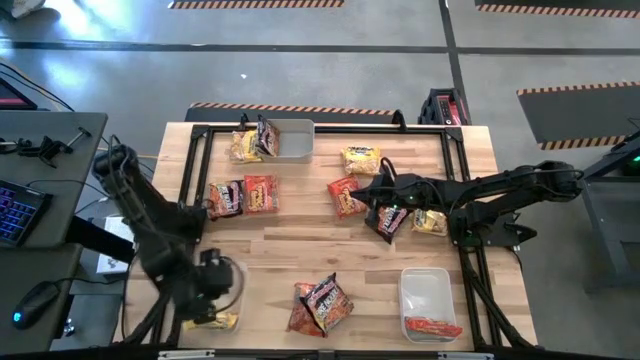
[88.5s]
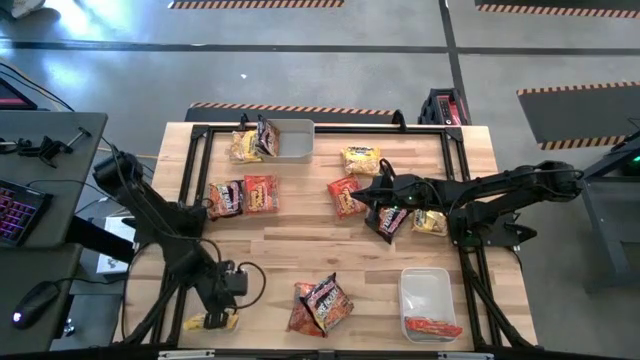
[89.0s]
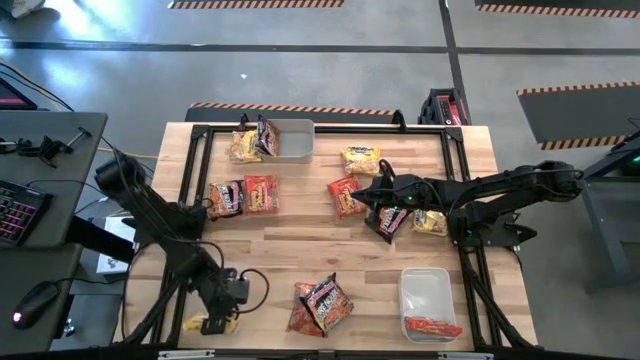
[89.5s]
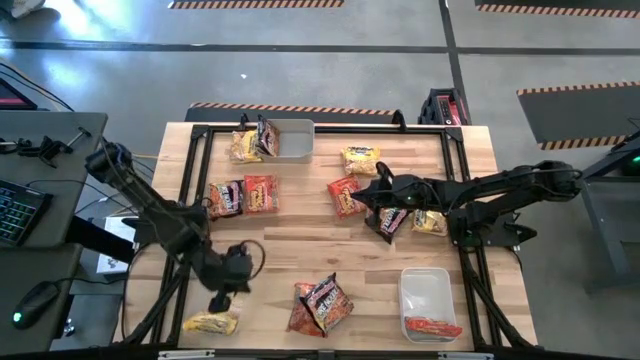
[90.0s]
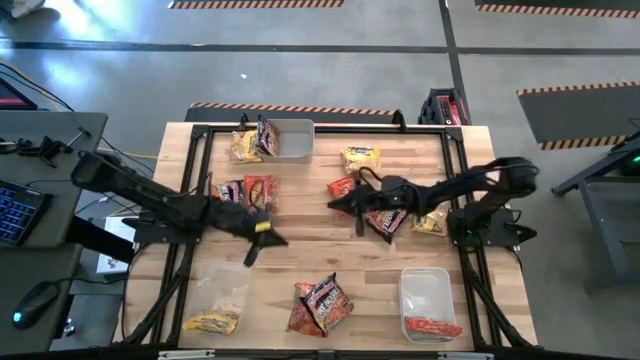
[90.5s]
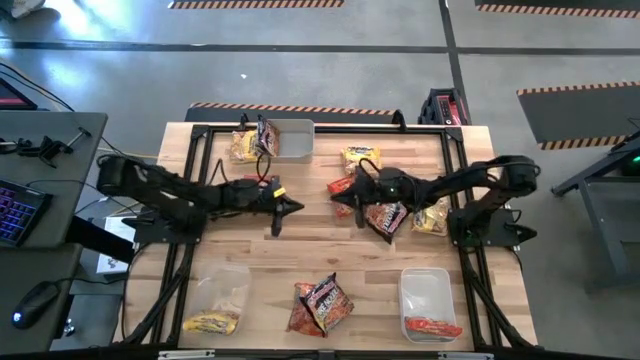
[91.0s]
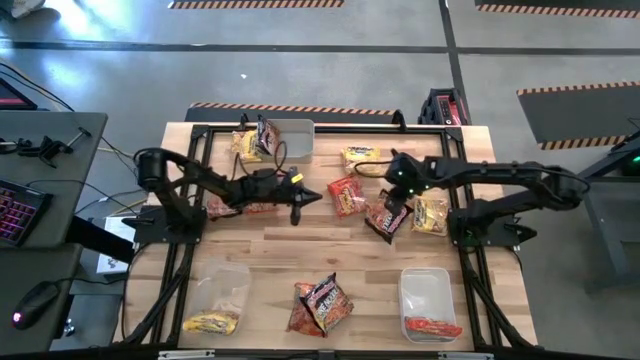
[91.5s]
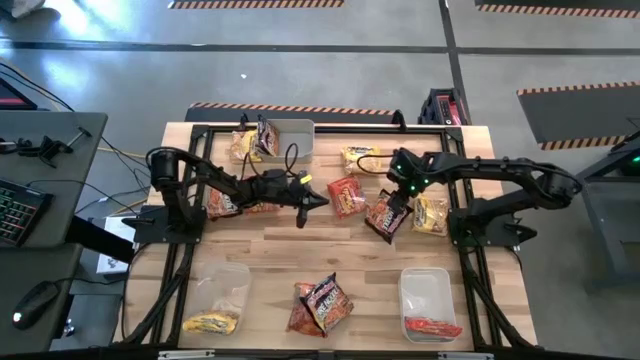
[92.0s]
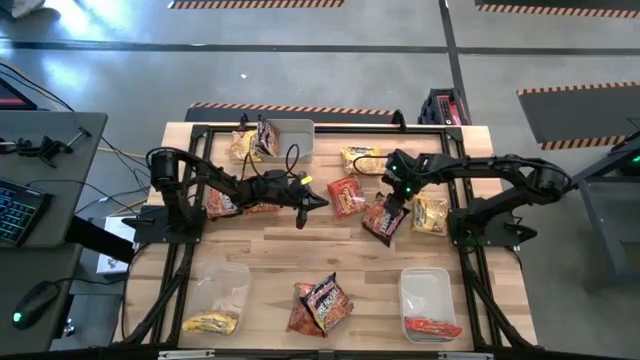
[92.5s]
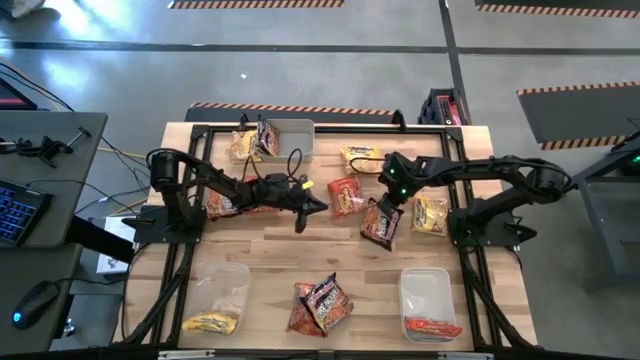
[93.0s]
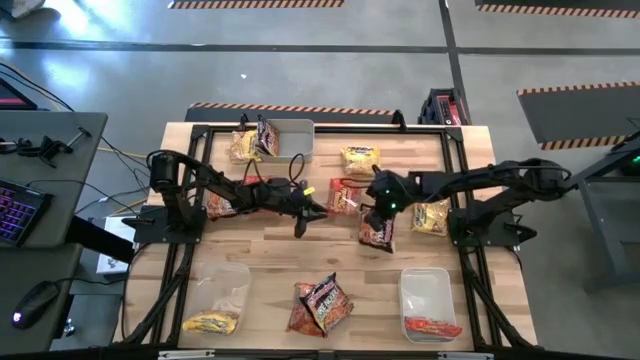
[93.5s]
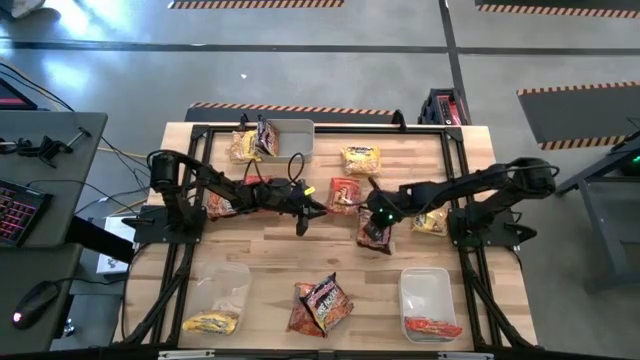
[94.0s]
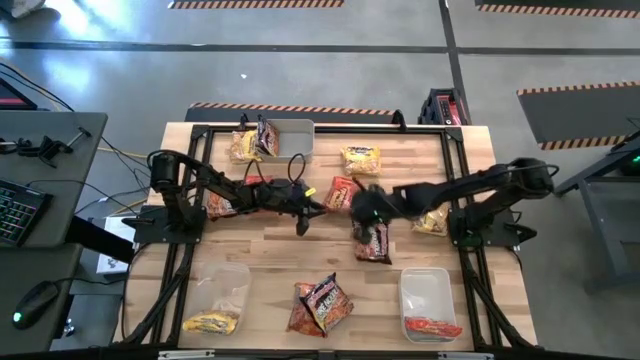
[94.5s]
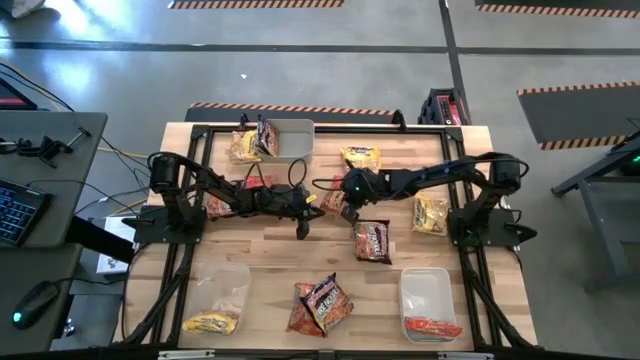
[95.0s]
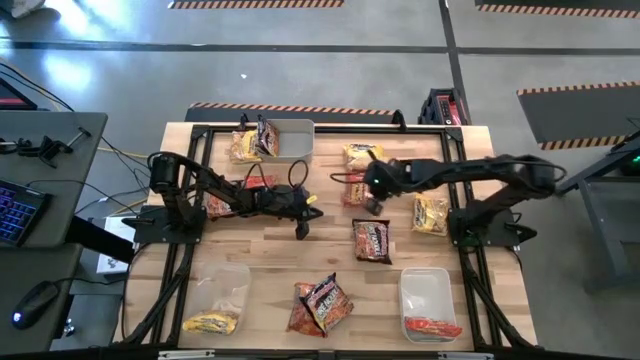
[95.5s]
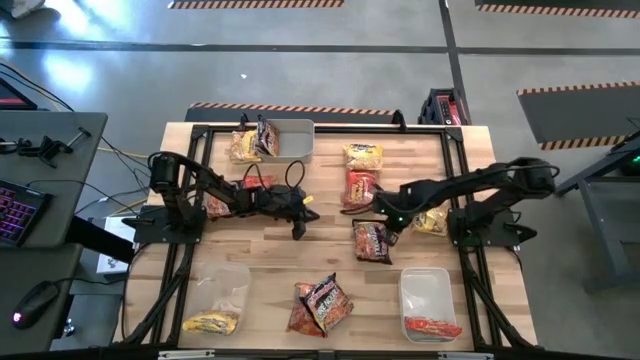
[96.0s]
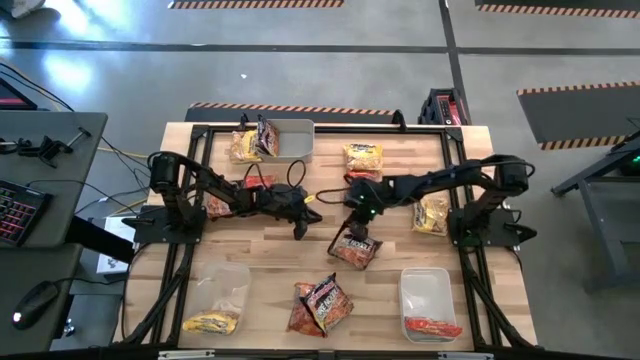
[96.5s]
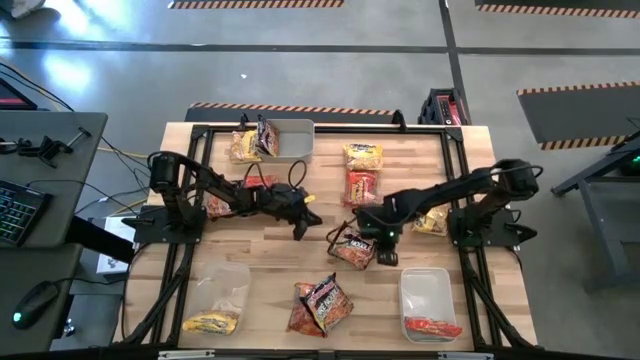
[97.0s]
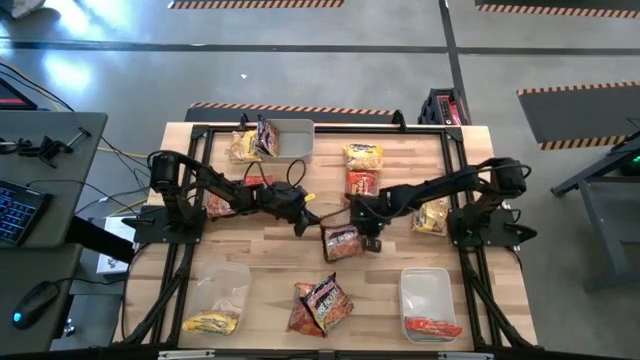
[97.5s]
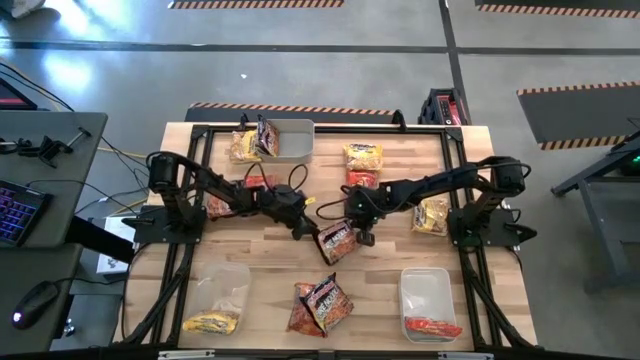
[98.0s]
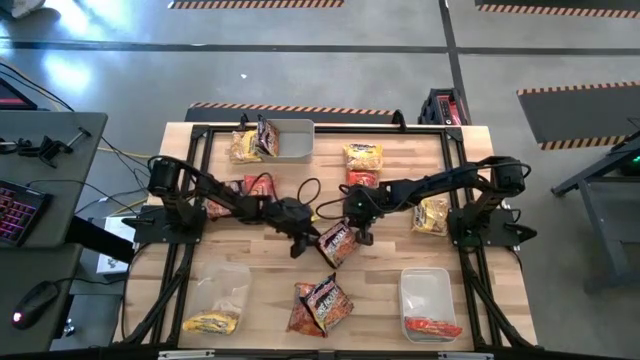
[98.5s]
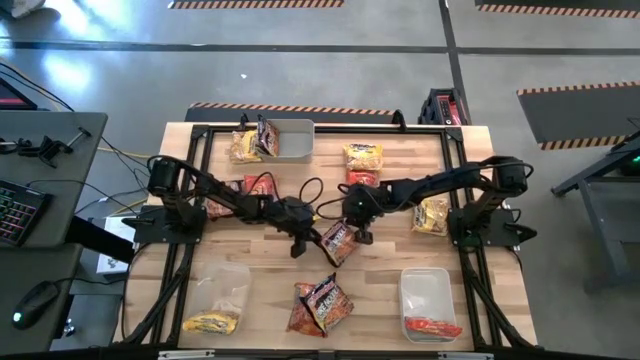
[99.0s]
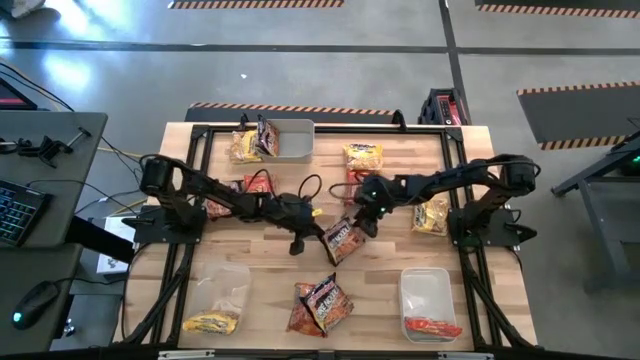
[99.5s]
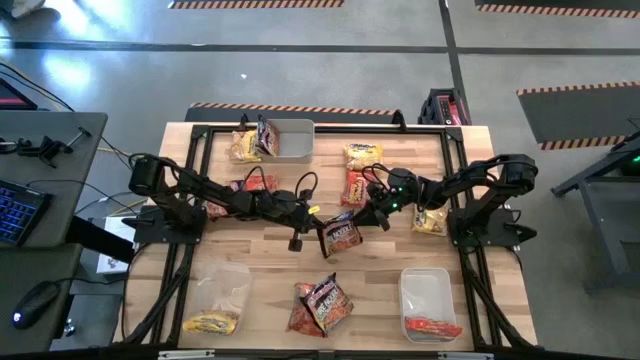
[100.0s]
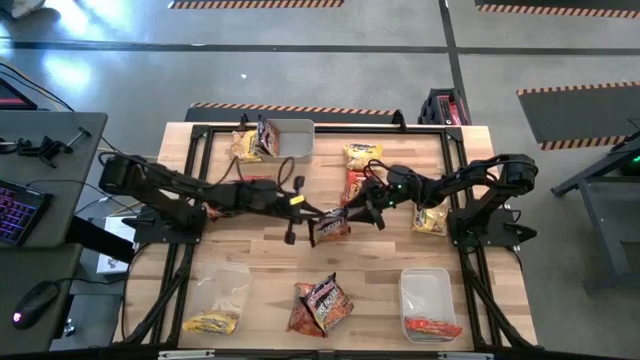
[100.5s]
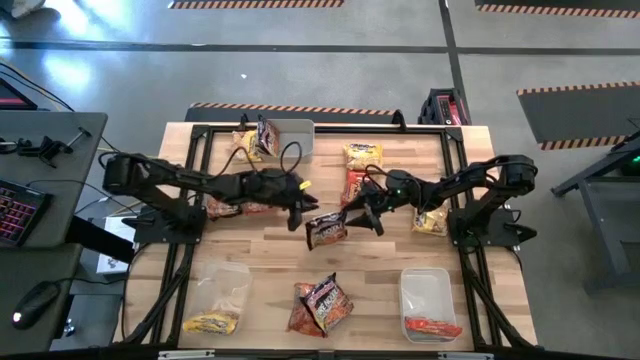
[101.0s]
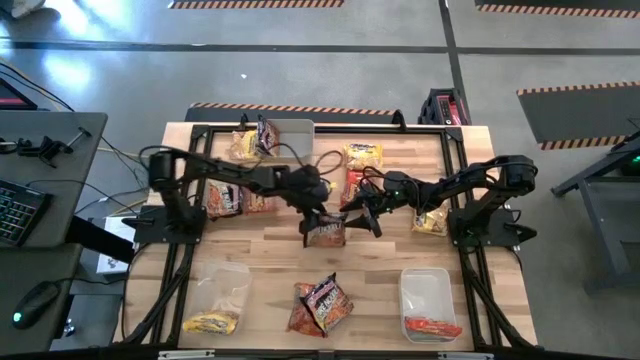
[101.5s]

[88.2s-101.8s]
Task: Sort Maruchan noodles
Put the top right black noodle pack into the gray bin

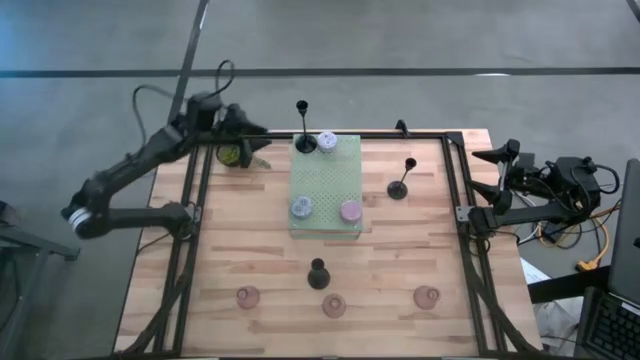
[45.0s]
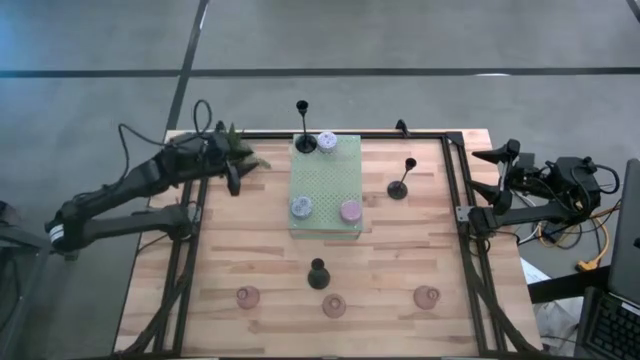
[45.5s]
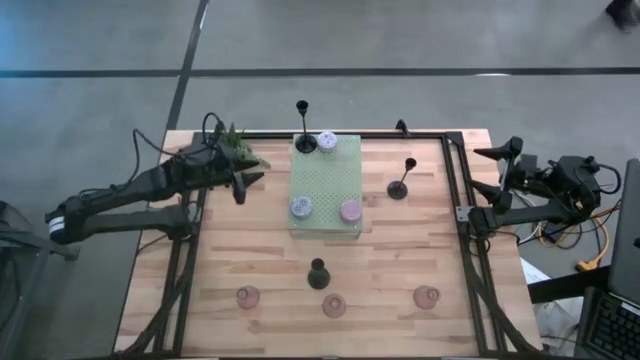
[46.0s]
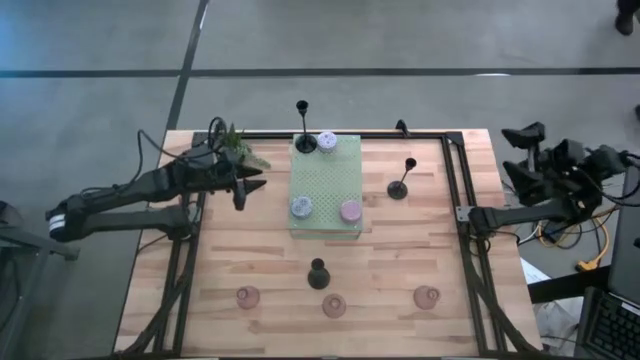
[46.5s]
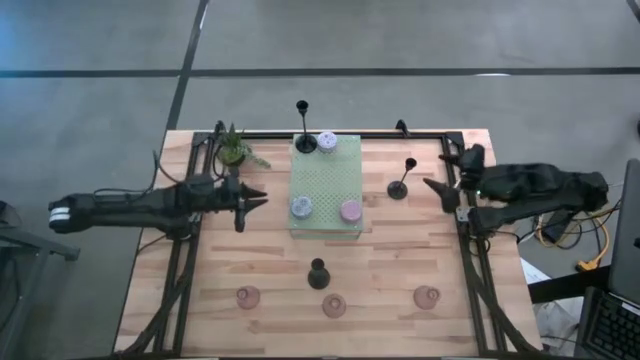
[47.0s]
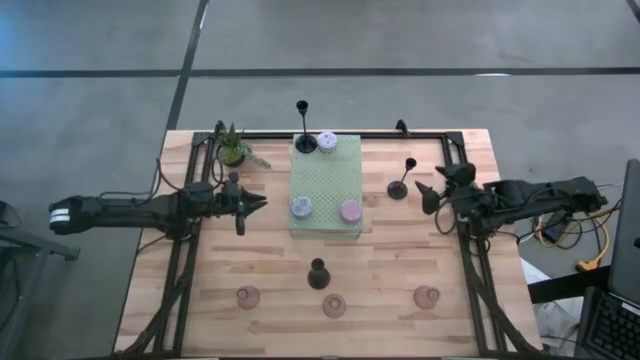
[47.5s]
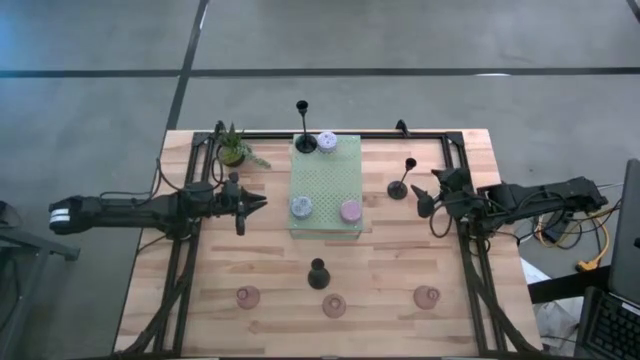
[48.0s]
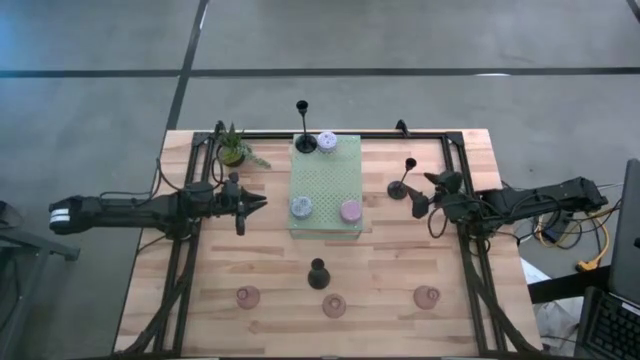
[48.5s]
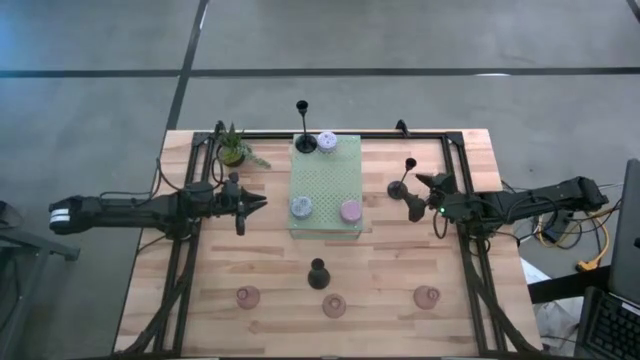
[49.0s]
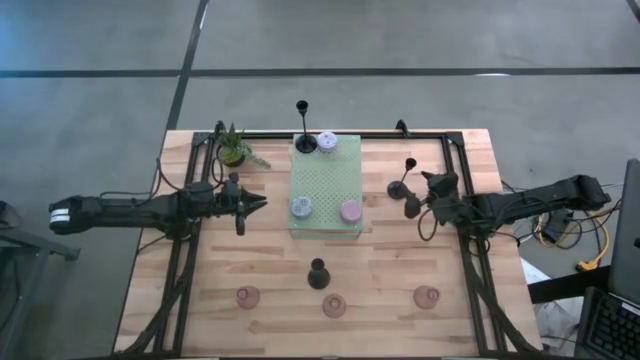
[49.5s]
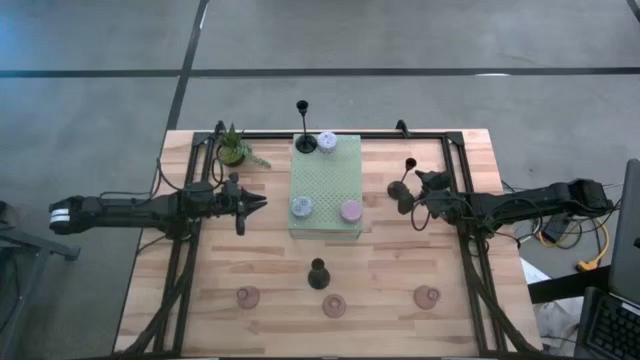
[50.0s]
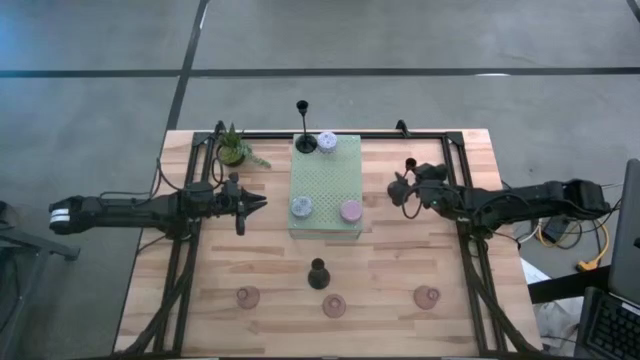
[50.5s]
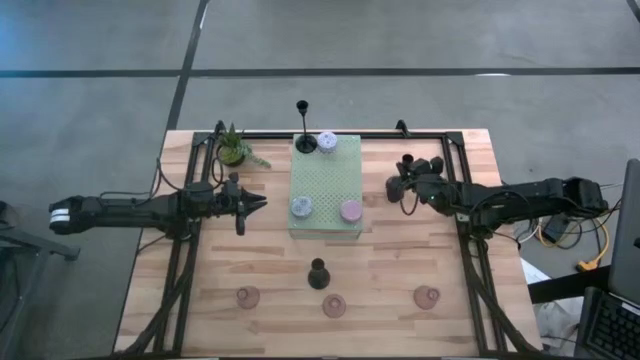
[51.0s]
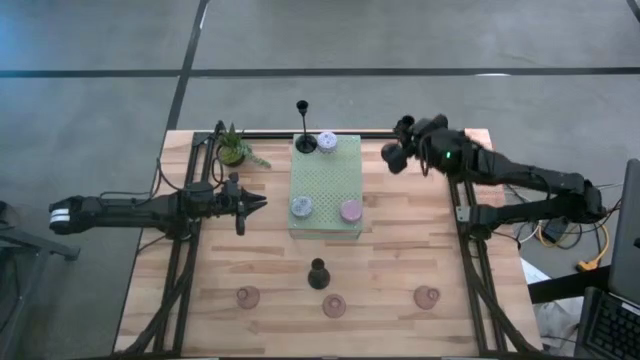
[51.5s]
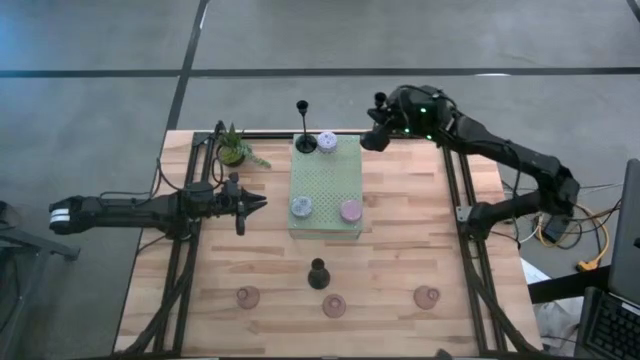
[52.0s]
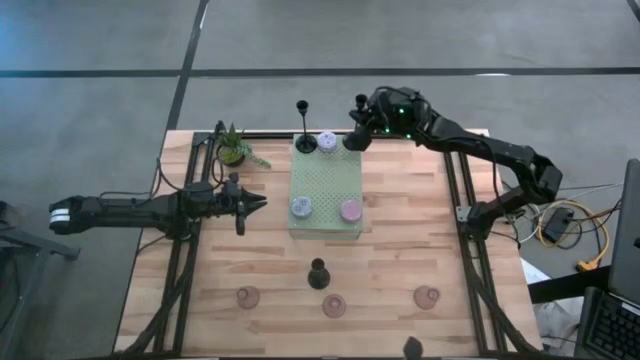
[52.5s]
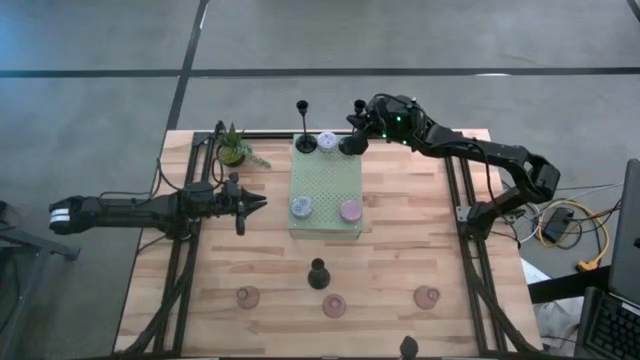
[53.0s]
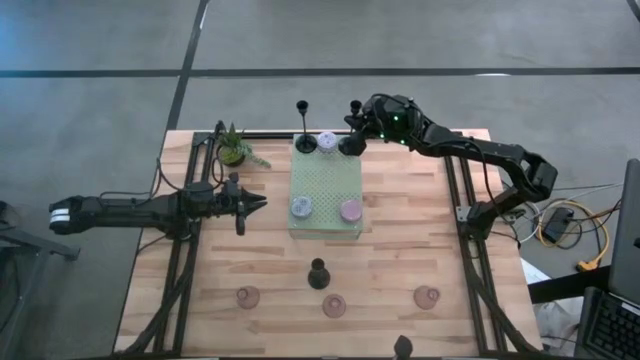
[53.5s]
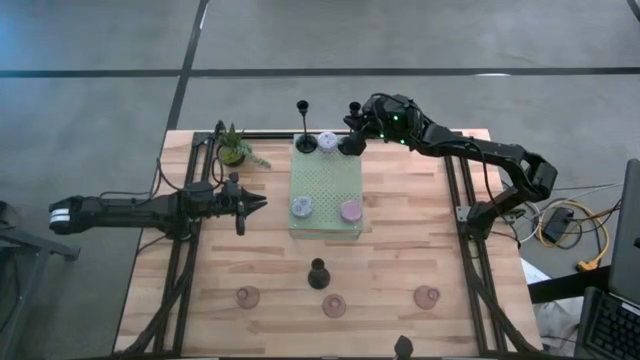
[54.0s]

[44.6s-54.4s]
Task: Pick & Place candle stick holders
Put the top black candle holder on the shelf
